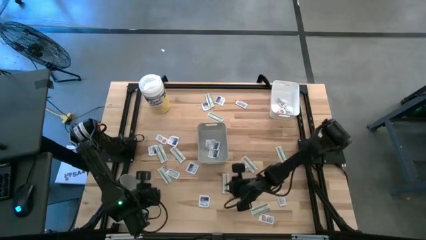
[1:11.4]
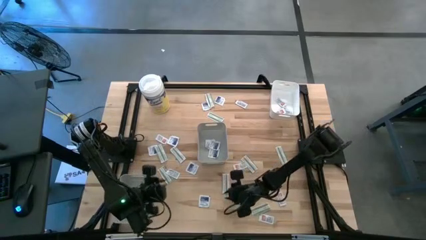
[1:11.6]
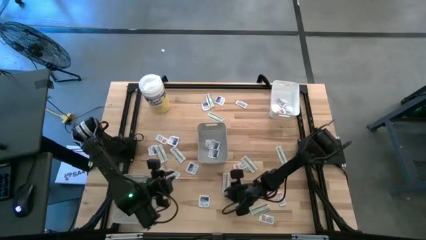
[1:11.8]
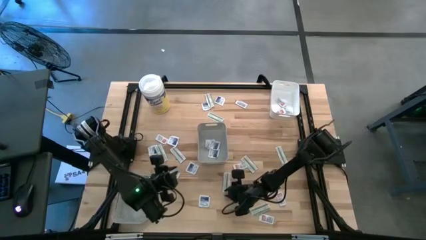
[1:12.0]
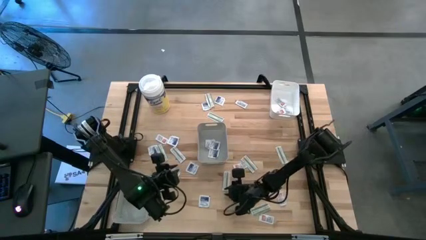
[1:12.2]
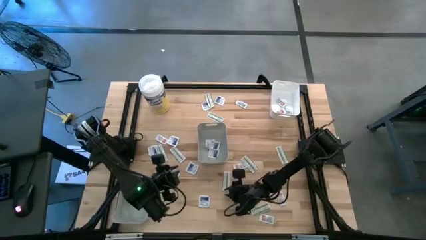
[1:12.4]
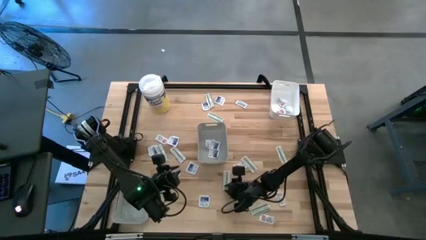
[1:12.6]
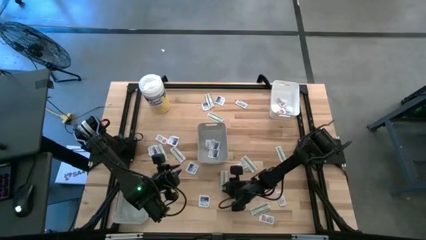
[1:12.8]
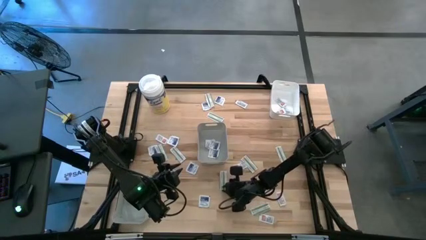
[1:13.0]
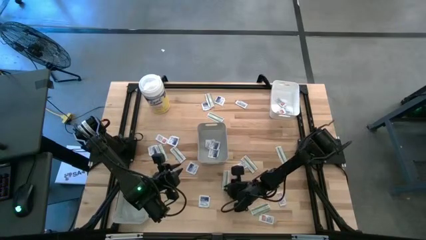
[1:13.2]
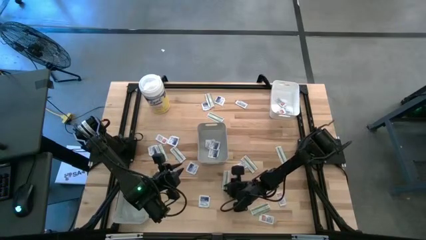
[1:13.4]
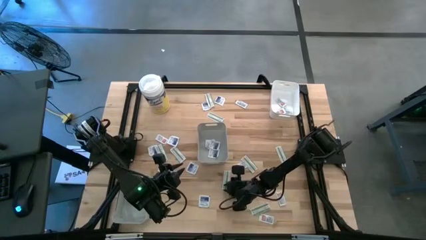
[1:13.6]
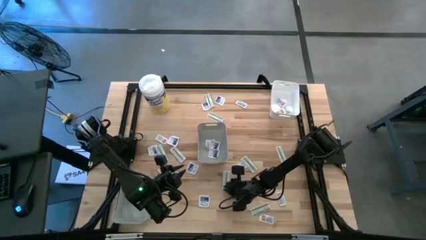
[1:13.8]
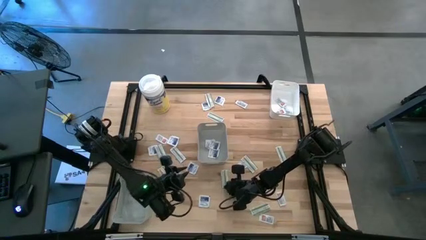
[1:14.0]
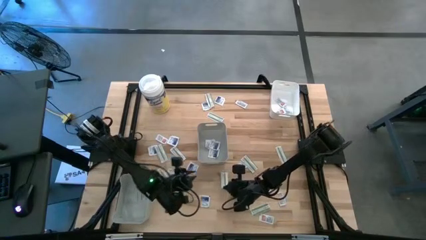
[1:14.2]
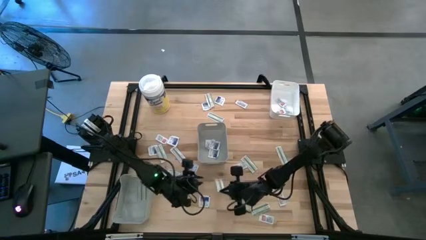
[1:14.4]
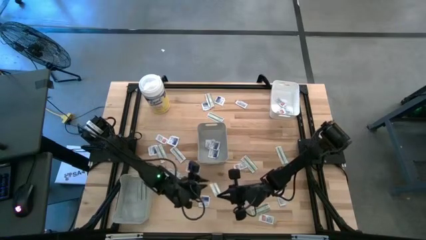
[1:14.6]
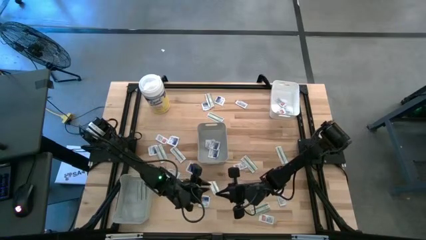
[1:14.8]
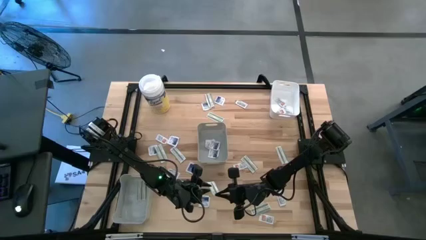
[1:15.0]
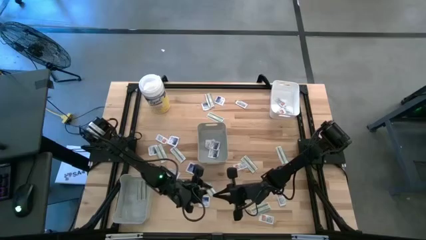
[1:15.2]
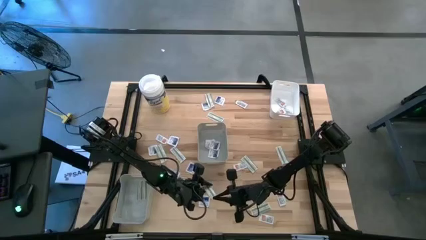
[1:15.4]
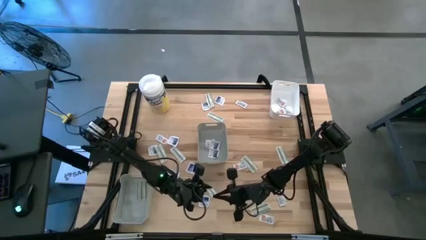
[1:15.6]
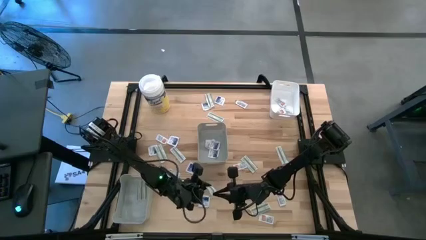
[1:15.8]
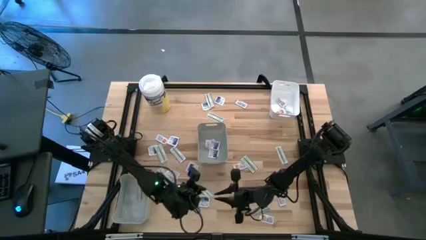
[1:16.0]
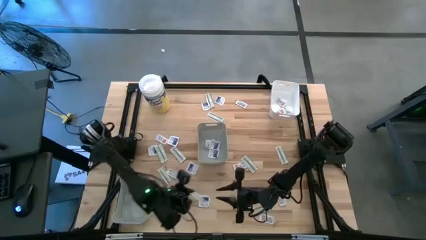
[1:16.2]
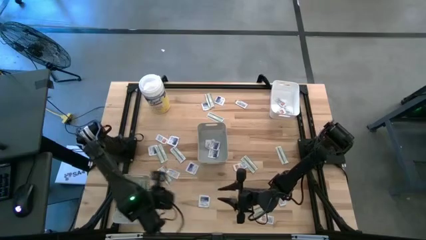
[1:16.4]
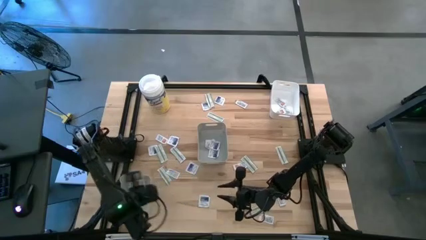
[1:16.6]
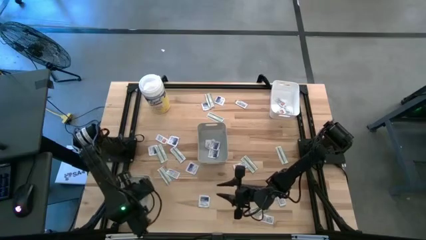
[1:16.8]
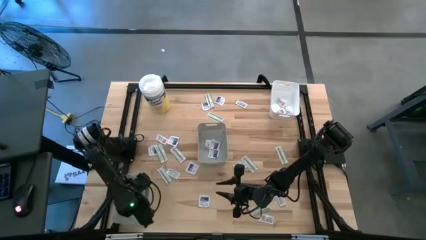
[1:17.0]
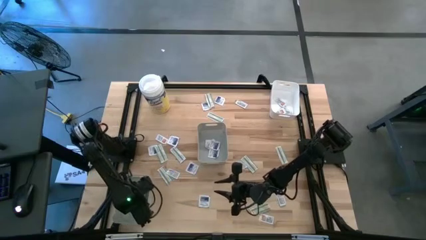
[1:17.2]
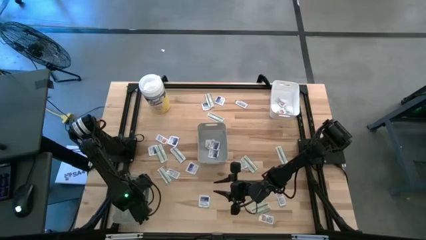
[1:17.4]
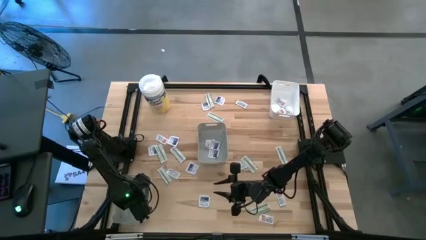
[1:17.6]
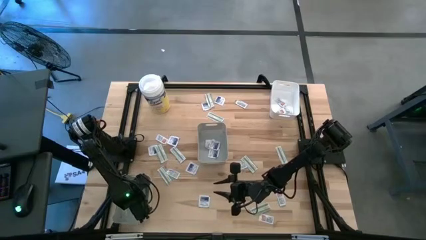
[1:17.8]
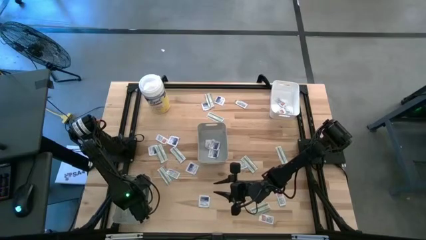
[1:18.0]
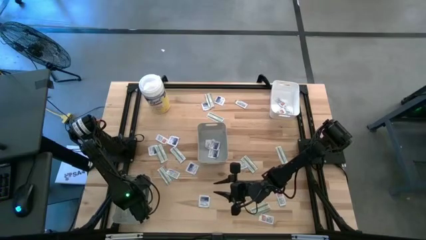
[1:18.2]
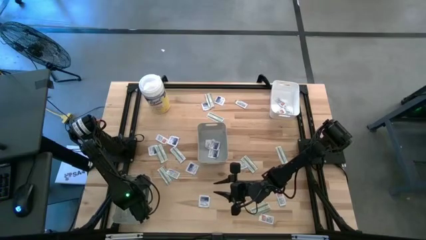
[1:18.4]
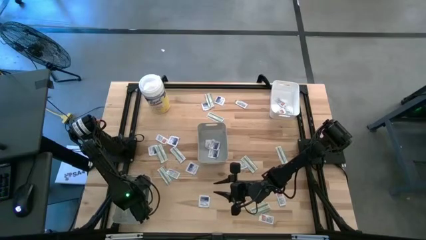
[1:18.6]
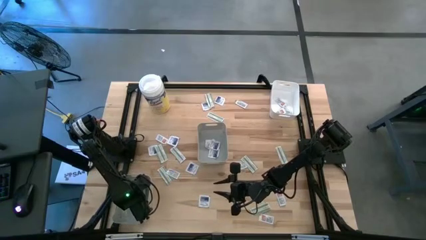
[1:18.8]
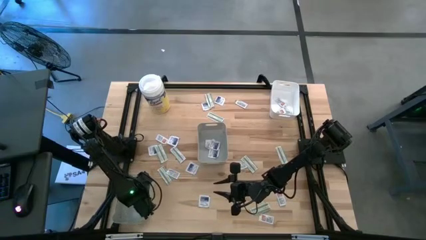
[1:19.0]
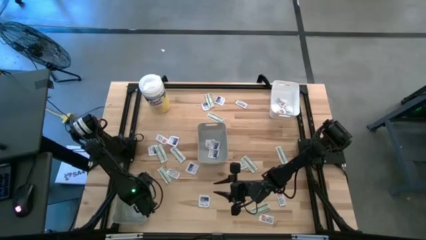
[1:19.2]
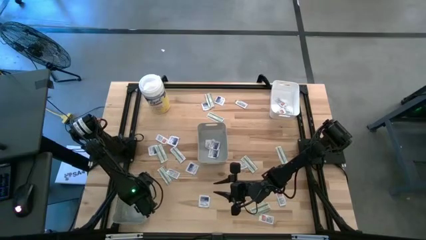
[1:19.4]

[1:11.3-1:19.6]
Task: Pick & Place First Aid Supplies
Put the green pad into the bottom gray bin

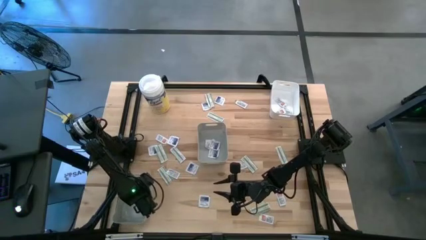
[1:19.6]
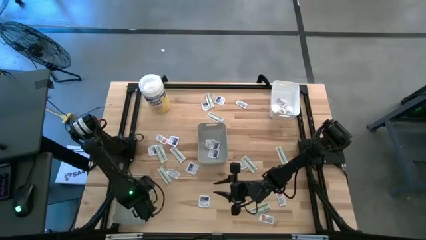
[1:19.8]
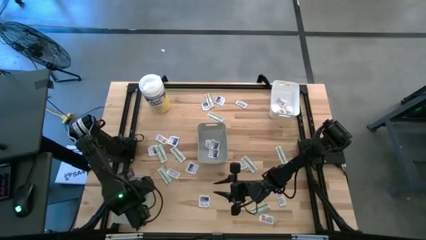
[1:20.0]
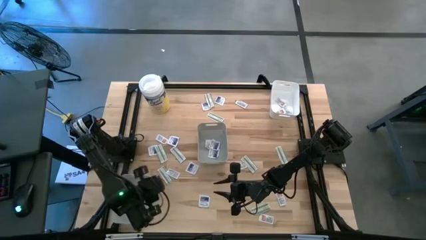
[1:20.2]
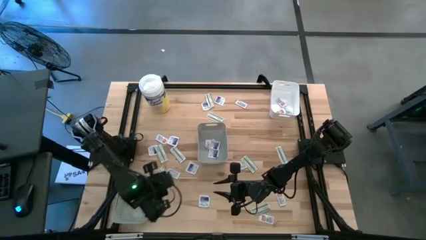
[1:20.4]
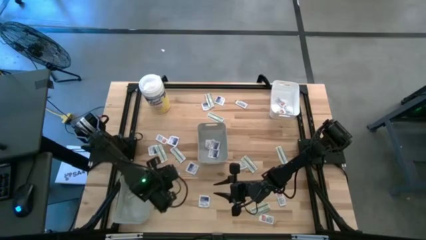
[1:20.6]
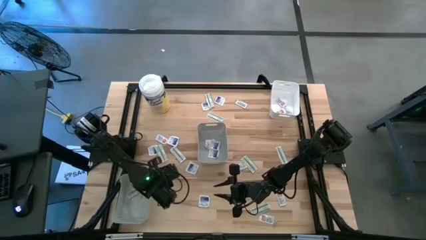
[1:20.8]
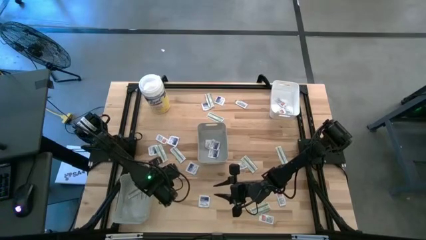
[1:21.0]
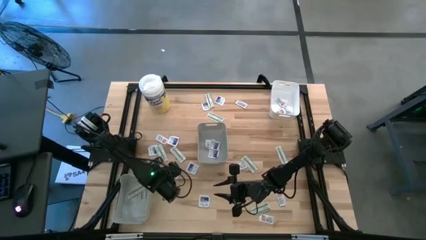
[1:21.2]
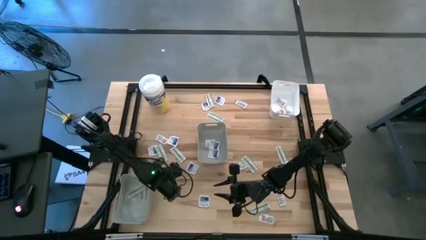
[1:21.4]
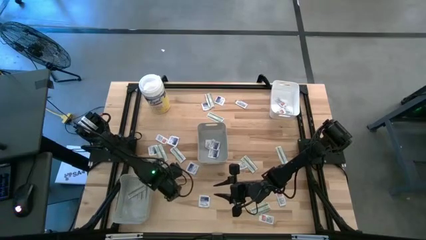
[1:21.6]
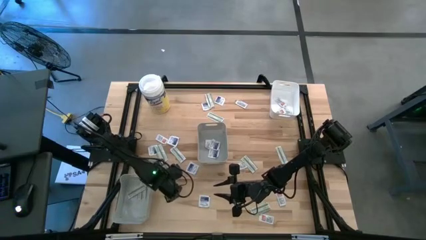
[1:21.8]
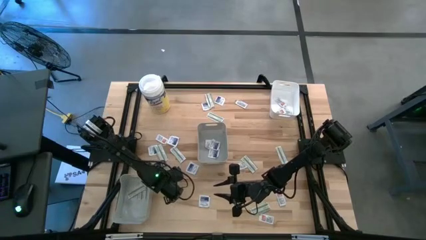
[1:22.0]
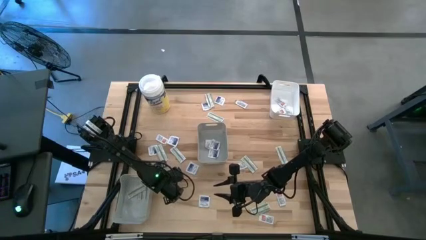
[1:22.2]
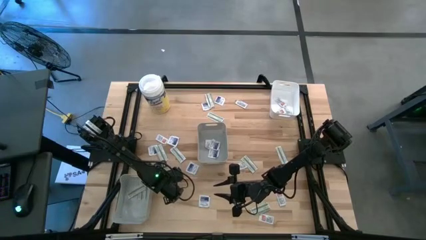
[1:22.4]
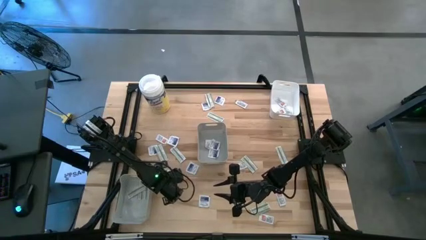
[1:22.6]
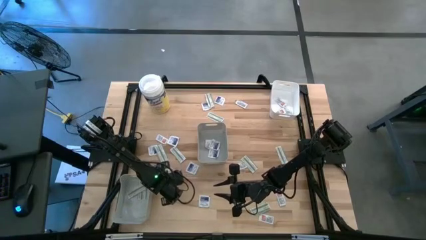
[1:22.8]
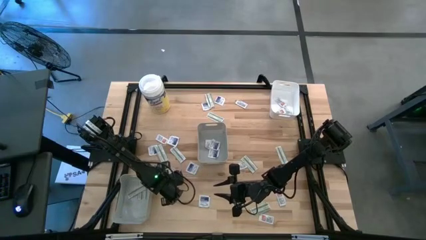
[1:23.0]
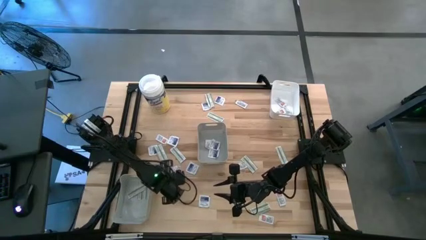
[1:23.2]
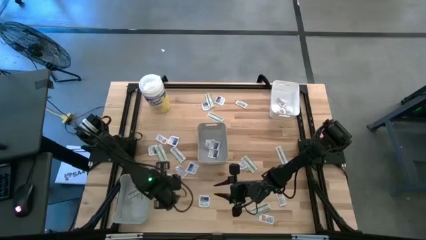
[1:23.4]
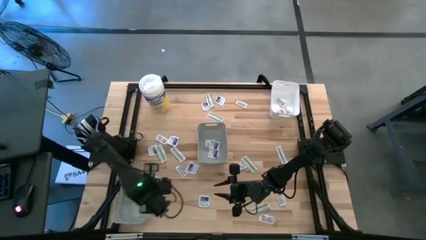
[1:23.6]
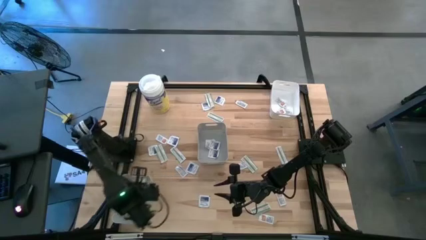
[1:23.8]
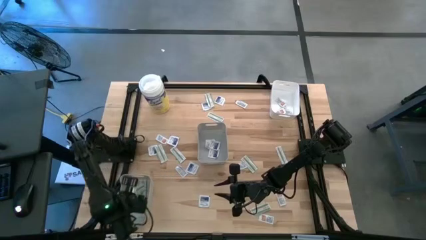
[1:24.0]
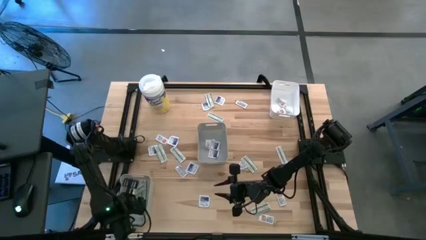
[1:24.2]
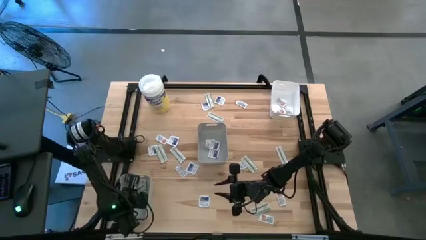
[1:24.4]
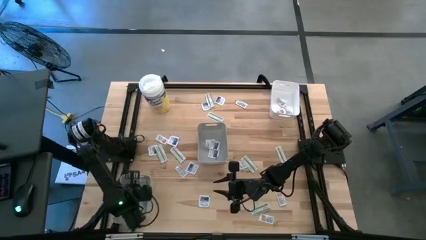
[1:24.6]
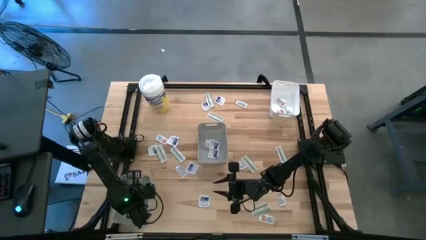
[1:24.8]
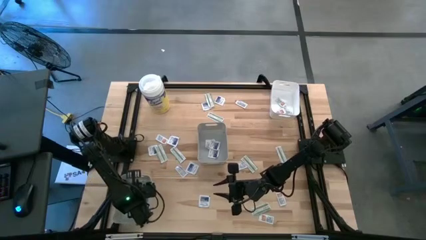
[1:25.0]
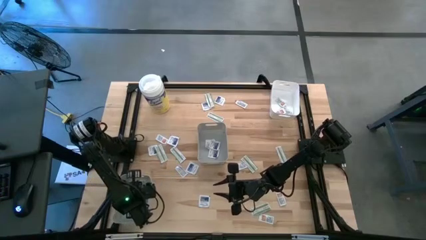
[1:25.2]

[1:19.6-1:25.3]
Put the green pad into the bottom gray bin
